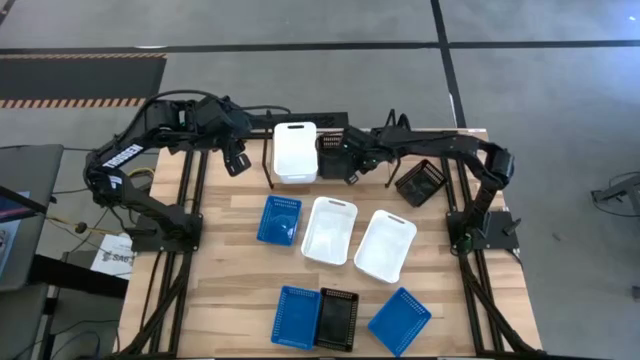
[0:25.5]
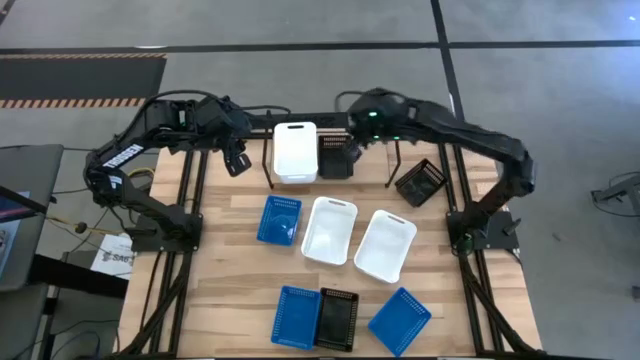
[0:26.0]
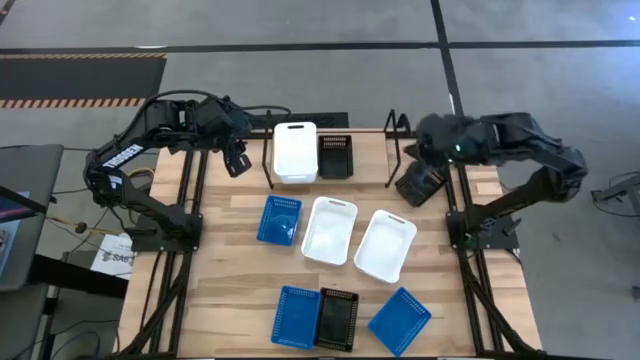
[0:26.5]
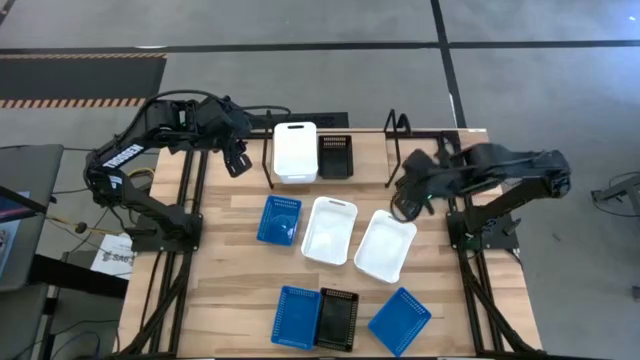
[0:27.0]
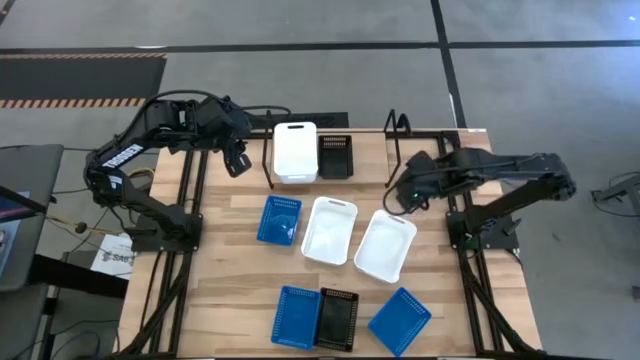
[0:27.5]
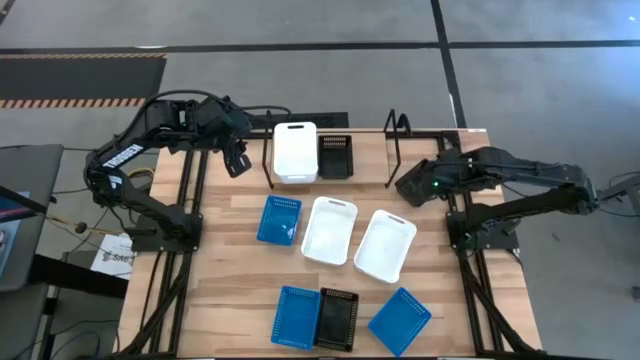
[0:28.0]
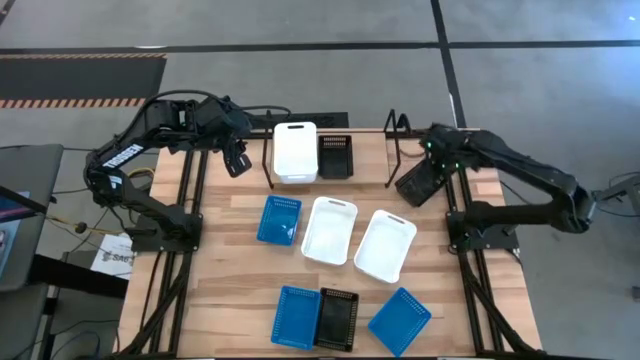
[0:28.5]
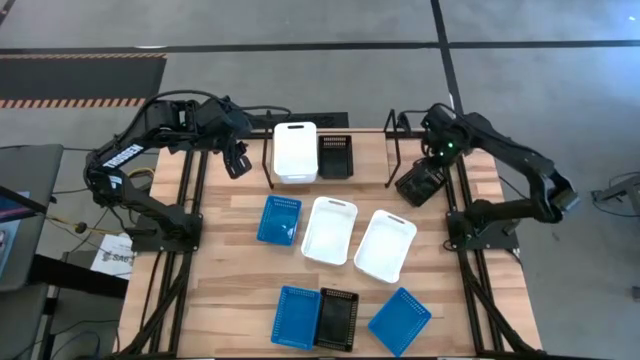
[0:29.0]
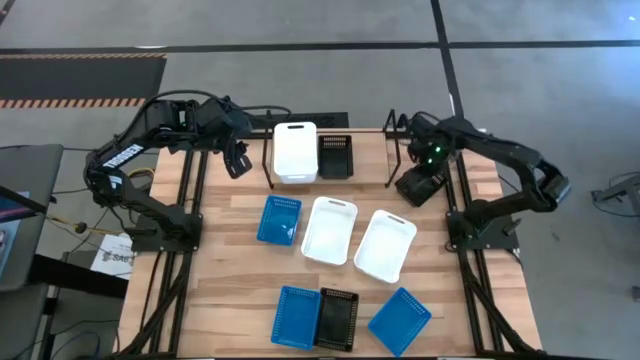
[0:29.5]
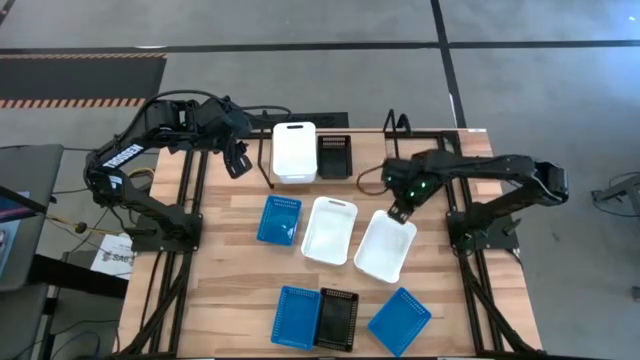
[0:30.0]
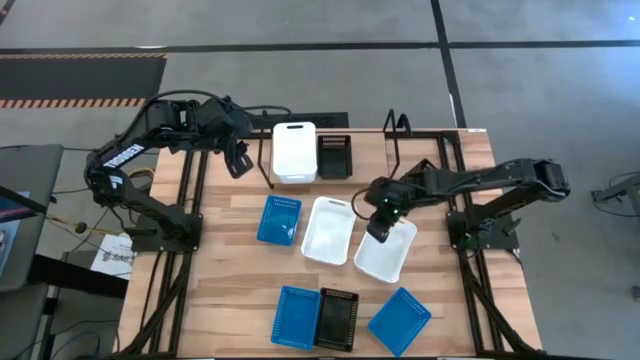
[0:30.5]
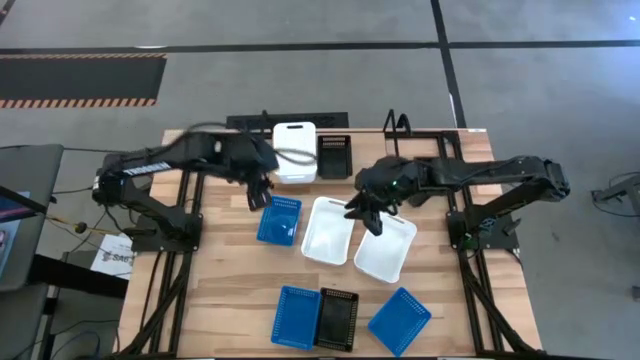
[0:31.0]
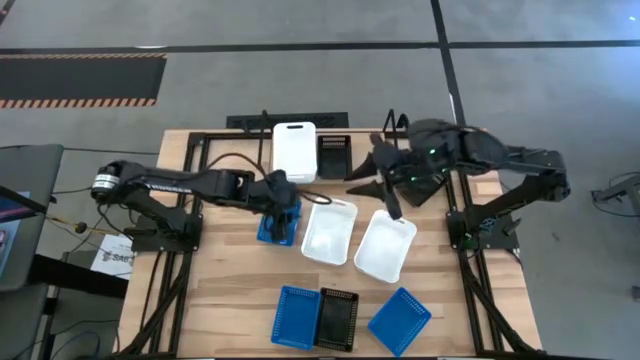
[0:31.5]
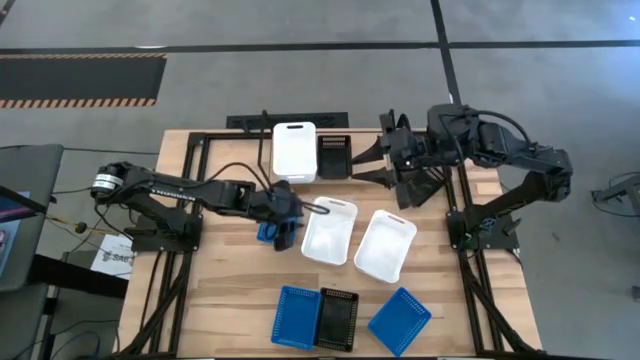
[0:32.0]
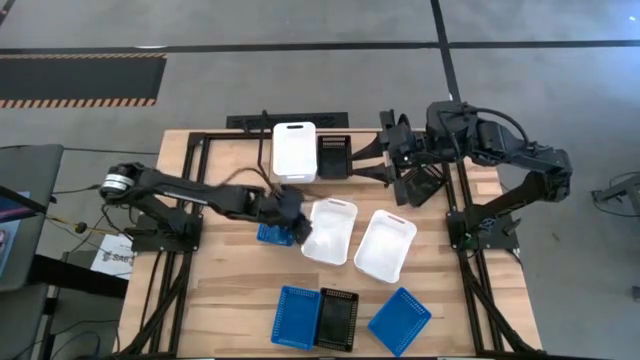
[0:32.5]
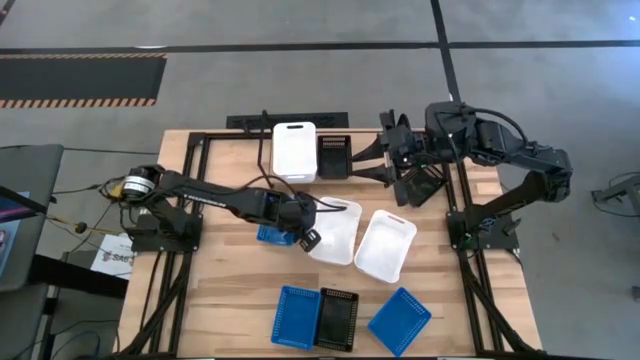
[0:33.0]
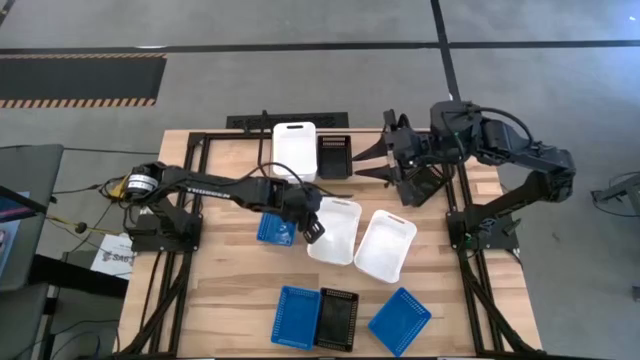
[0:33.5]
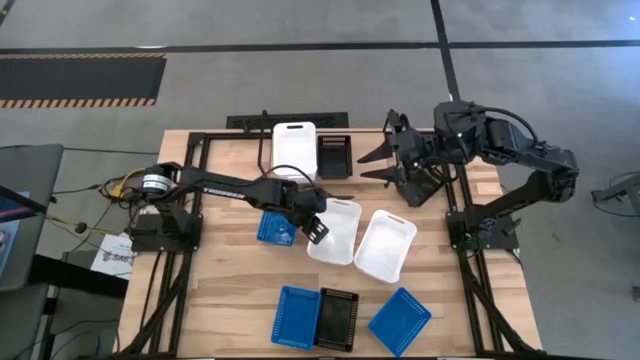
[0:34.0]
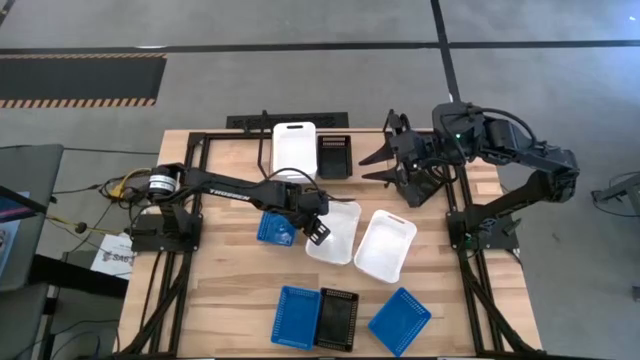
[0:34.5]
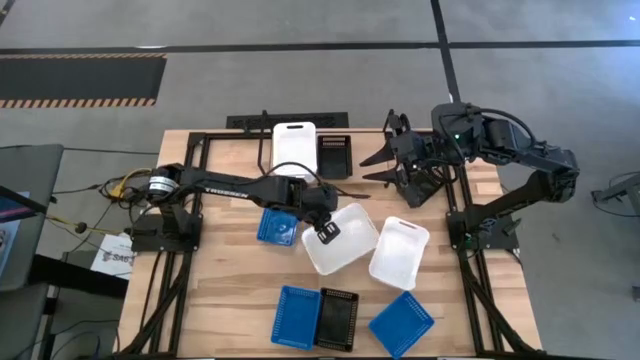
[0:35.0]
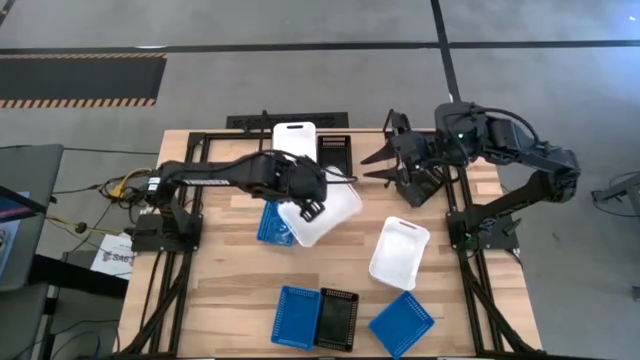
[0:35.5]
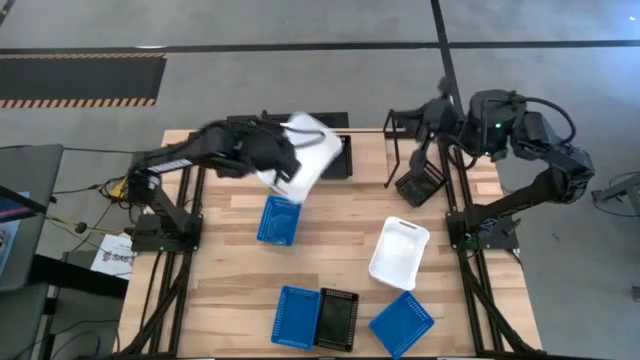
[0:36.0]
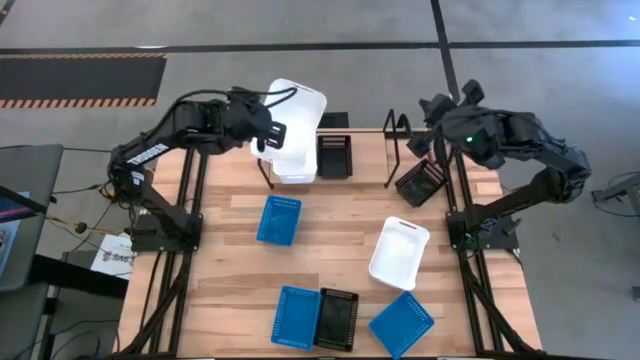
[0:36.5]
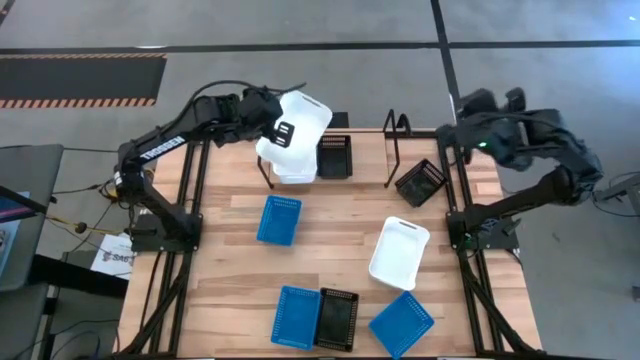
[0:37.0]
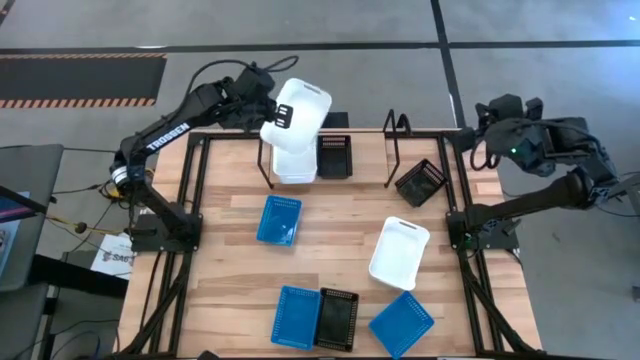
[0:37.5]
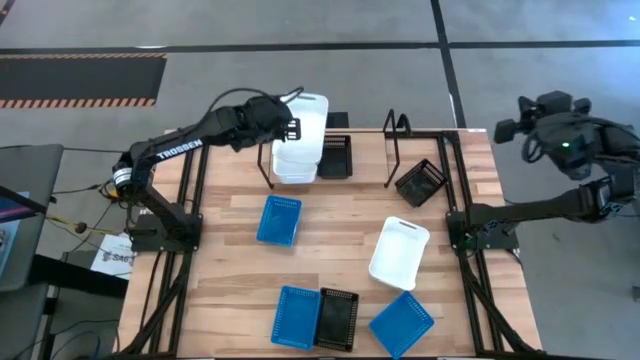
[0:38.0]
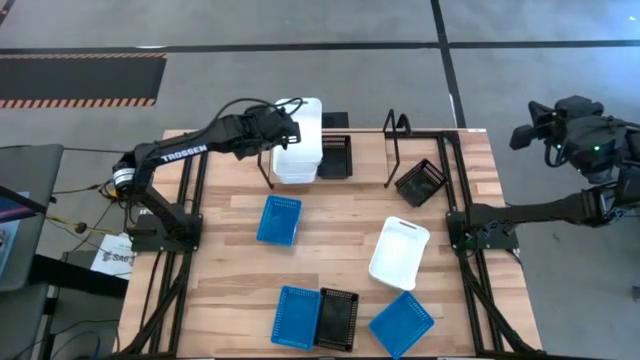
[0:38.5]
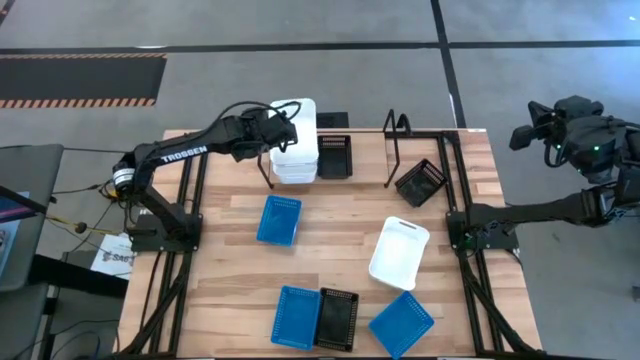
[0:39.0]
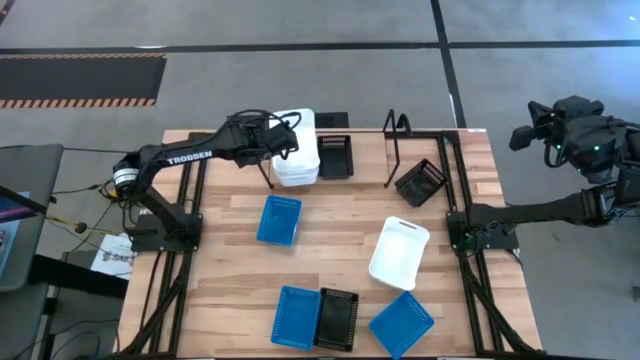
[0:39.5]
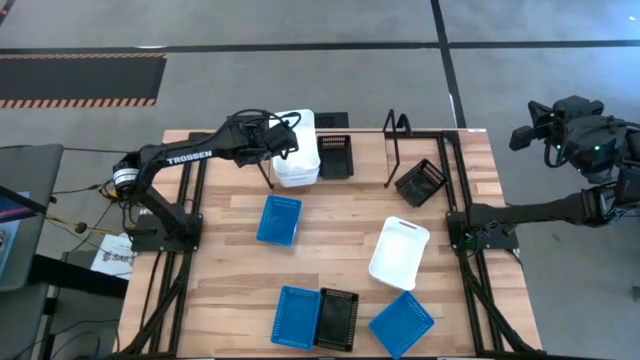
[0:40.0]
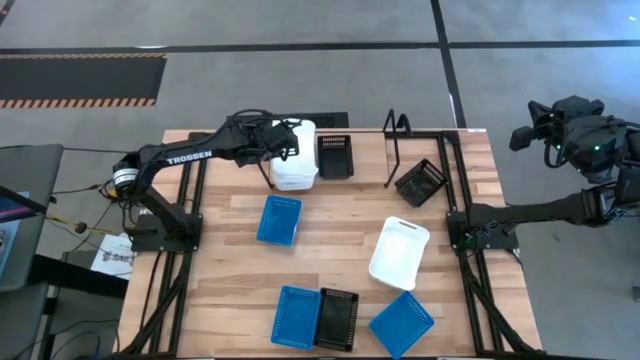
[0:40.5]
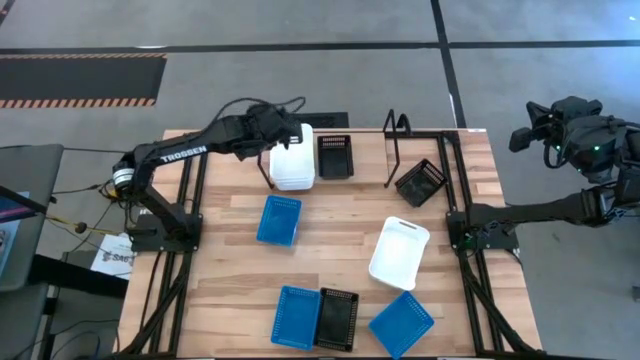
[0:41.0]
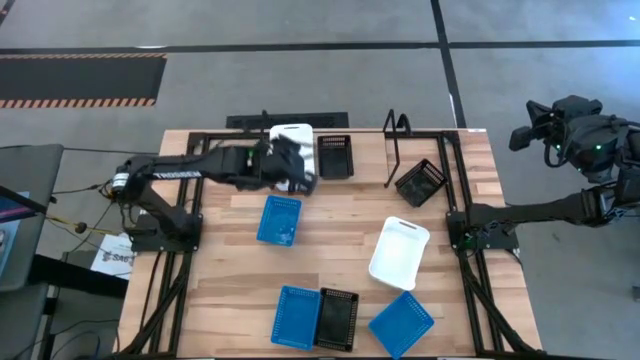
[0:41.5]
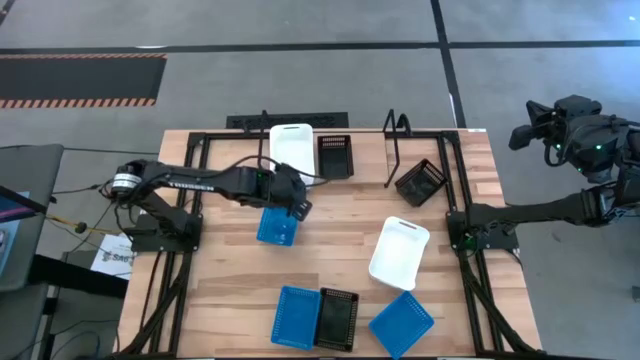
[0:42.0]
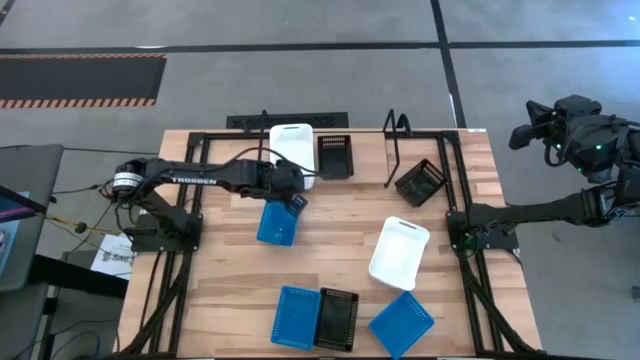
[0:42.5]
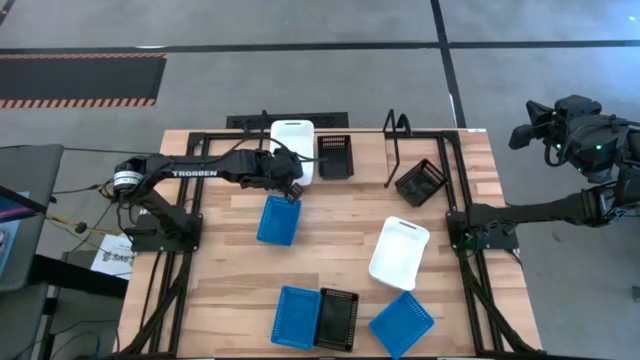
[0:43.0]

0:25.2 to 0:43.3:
Task: Stack baskets on shelf by color
Stack the left white bin on top of the white bin on the shelf

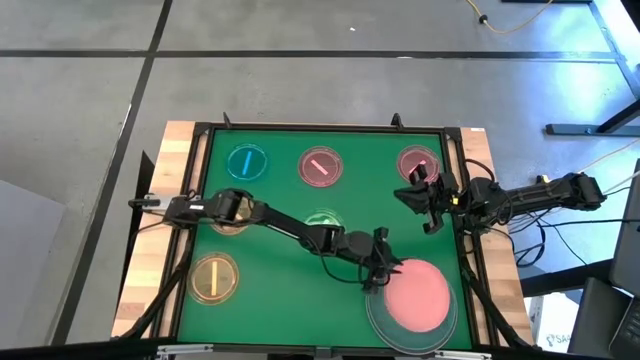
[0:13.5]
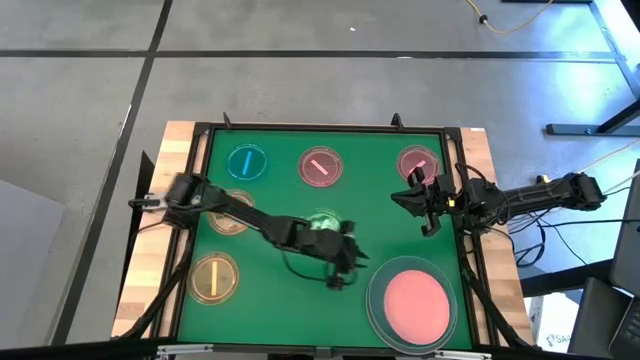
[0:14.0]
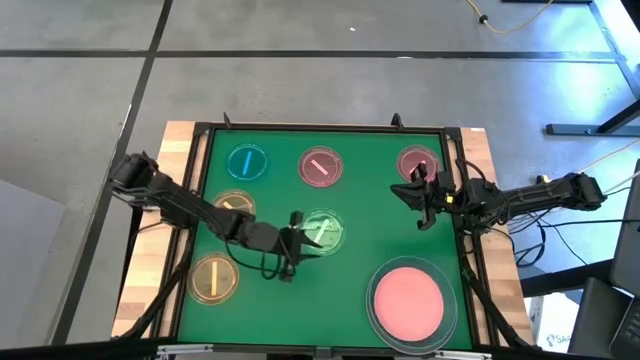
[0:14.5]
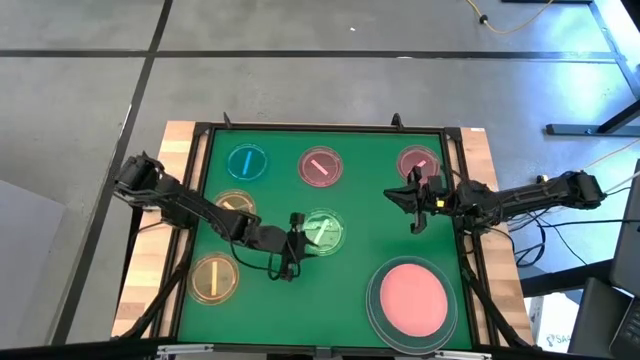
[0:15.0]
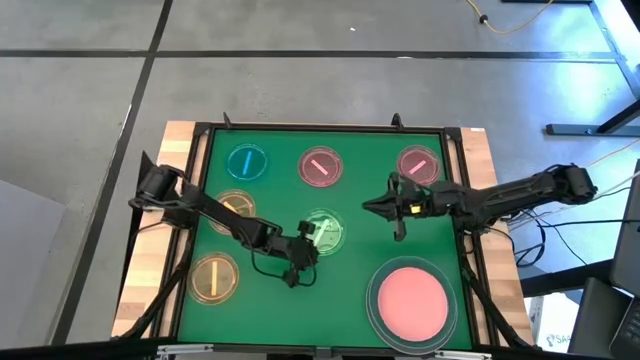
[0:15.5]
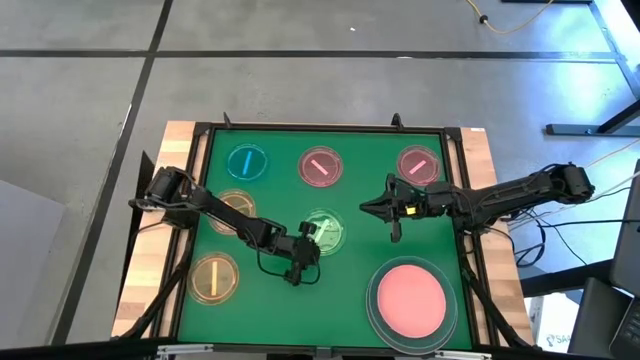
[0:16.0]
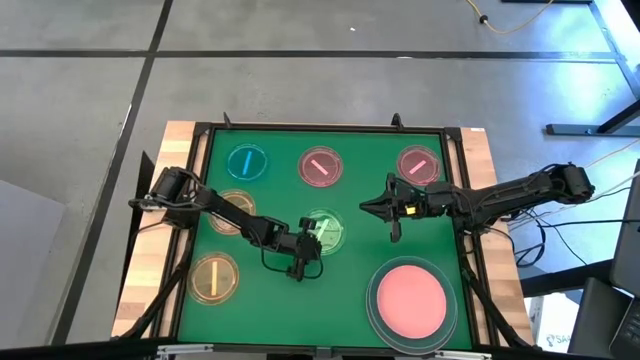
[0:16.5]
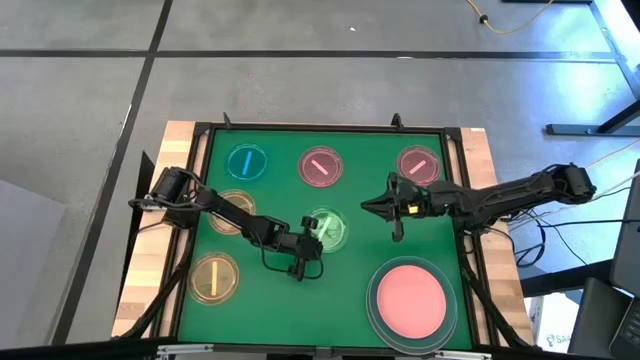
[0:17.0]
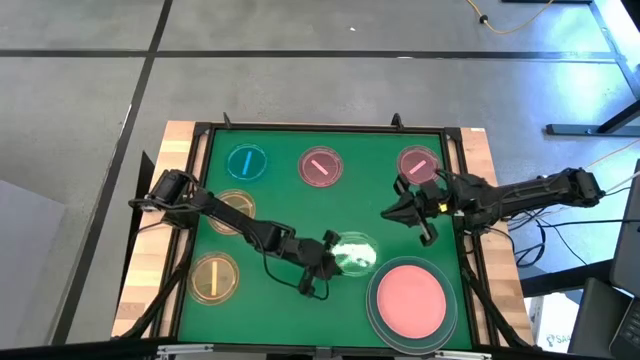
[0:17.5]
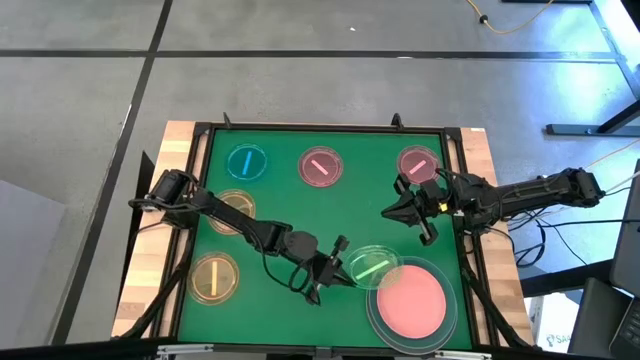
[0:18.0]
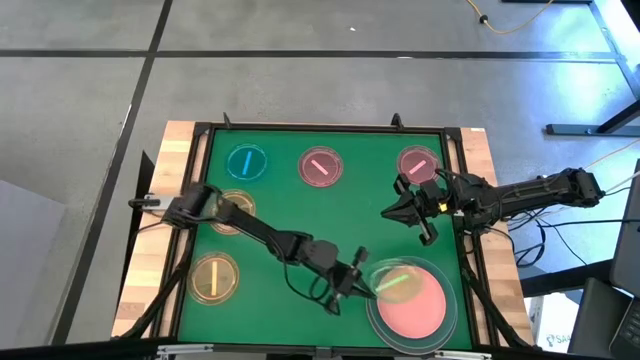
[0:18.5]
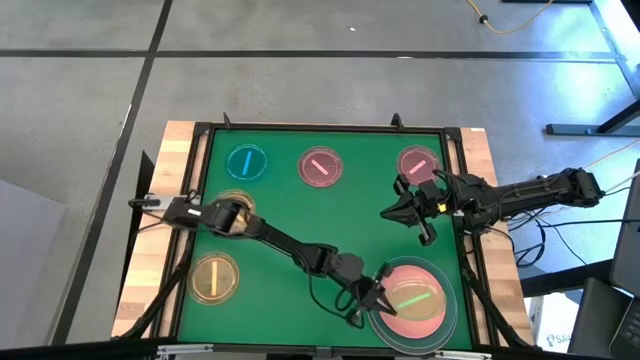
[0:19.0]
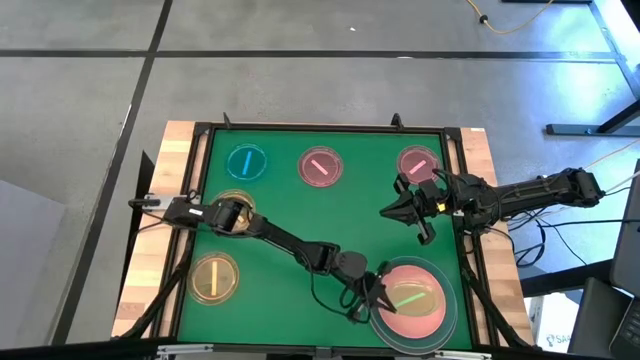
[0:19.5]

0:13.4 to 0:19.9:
Task: Stack plastic plates
Stack the transparent green plate on top of the pink plate
